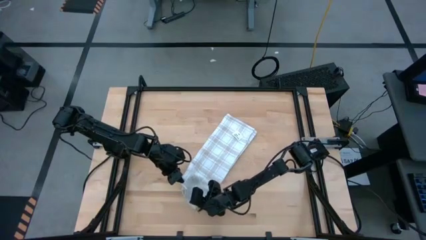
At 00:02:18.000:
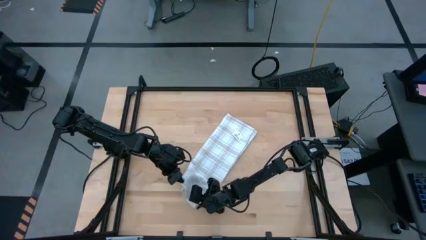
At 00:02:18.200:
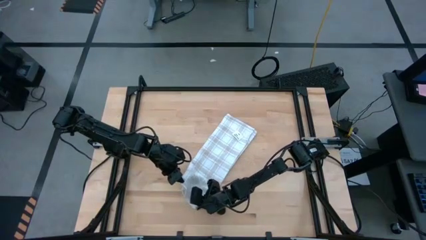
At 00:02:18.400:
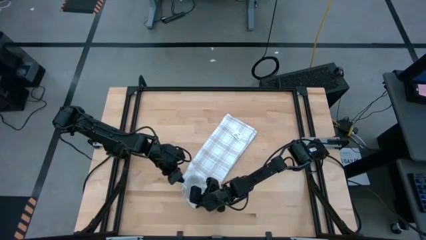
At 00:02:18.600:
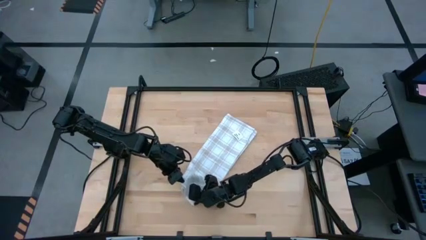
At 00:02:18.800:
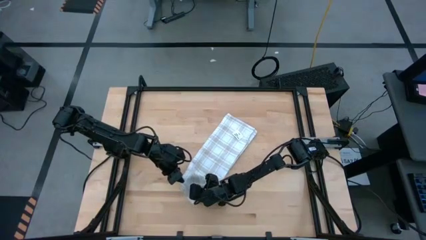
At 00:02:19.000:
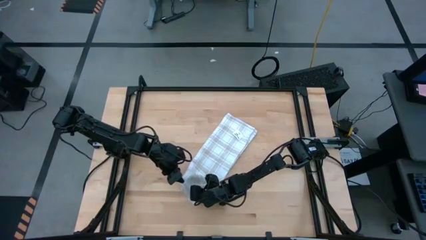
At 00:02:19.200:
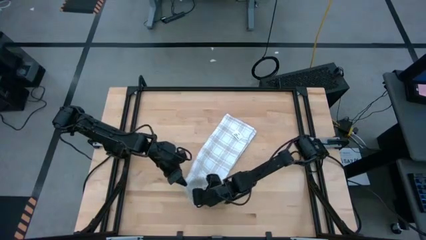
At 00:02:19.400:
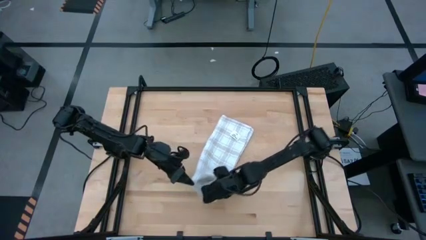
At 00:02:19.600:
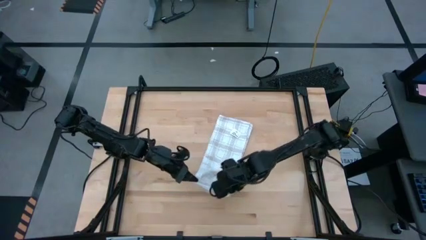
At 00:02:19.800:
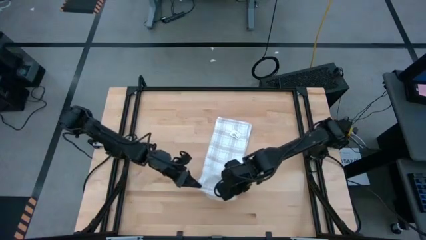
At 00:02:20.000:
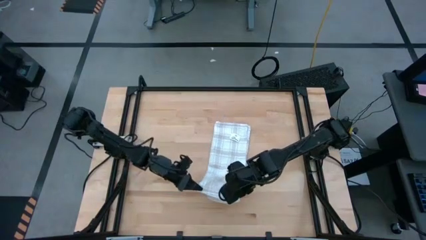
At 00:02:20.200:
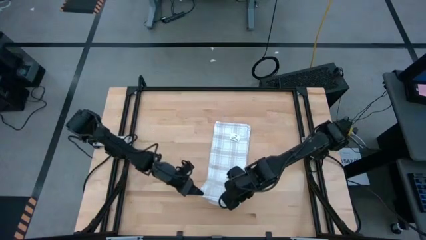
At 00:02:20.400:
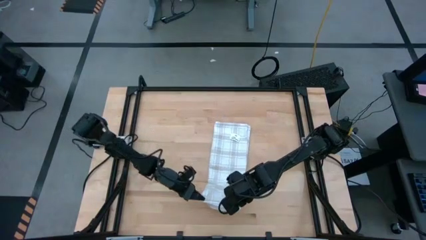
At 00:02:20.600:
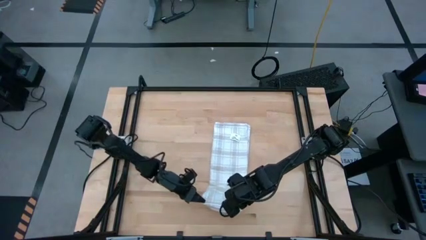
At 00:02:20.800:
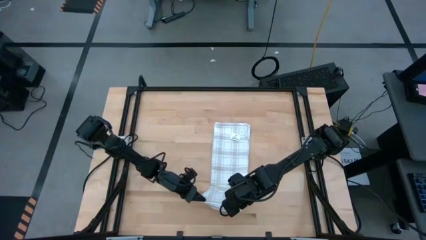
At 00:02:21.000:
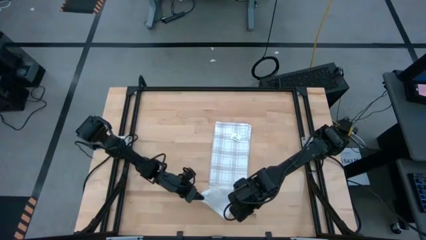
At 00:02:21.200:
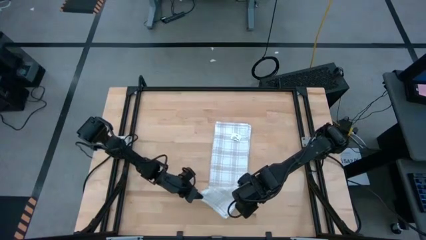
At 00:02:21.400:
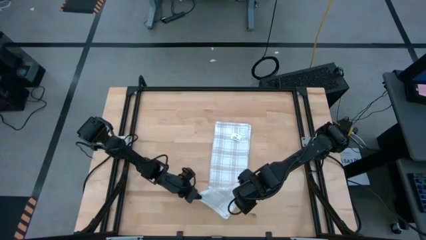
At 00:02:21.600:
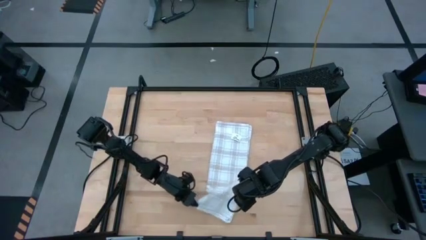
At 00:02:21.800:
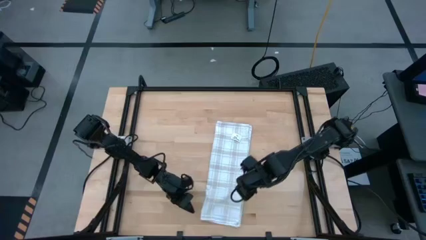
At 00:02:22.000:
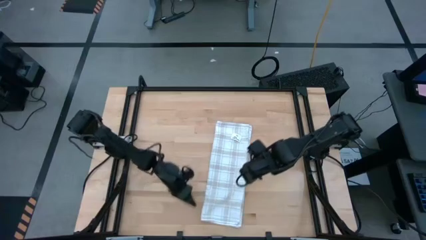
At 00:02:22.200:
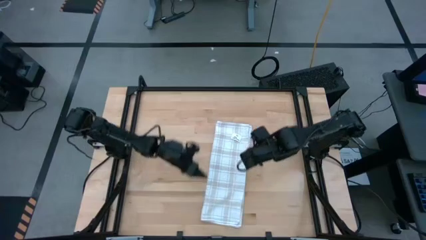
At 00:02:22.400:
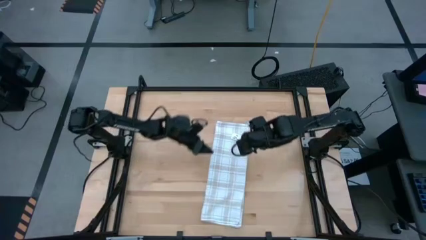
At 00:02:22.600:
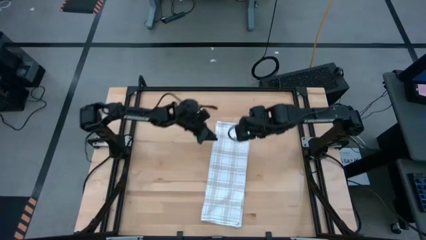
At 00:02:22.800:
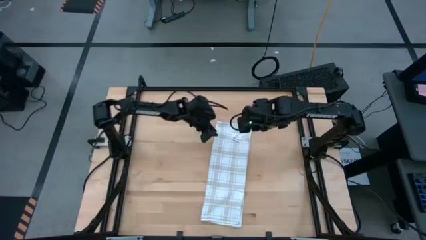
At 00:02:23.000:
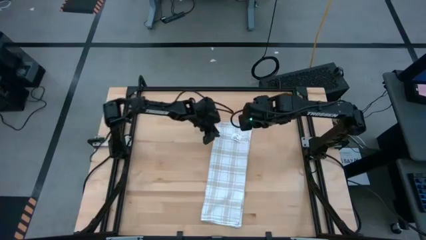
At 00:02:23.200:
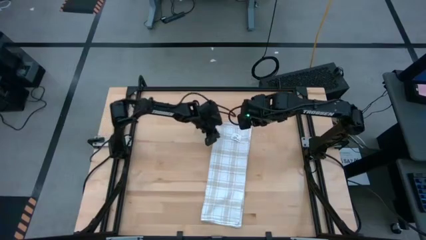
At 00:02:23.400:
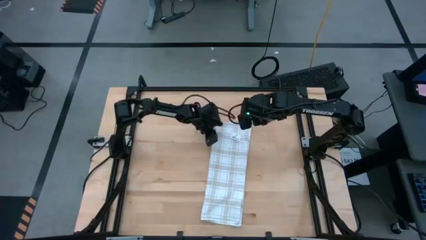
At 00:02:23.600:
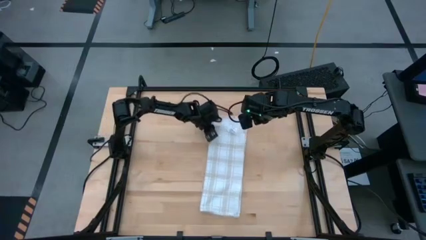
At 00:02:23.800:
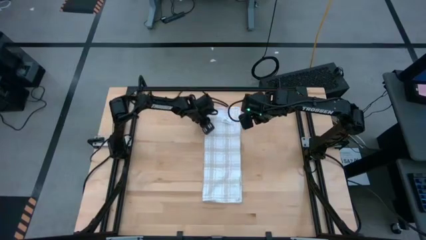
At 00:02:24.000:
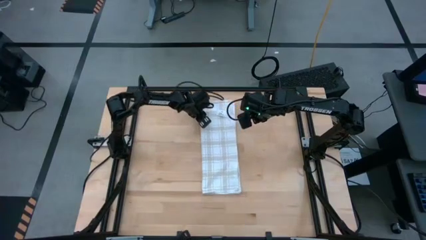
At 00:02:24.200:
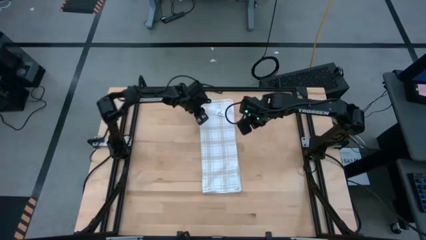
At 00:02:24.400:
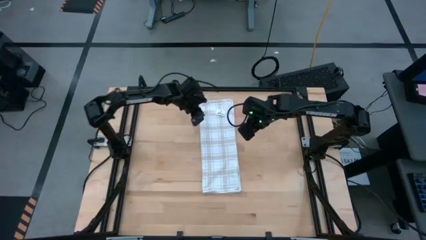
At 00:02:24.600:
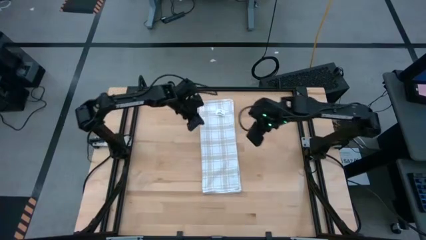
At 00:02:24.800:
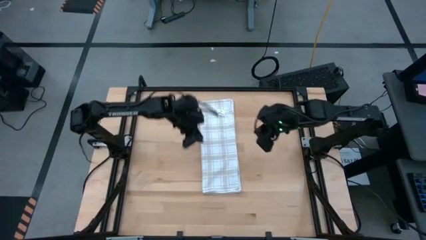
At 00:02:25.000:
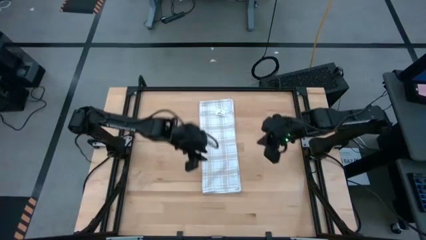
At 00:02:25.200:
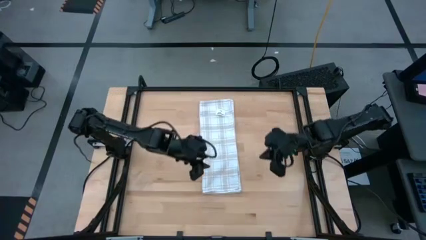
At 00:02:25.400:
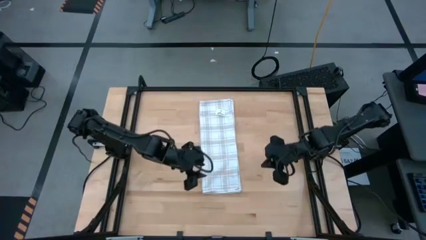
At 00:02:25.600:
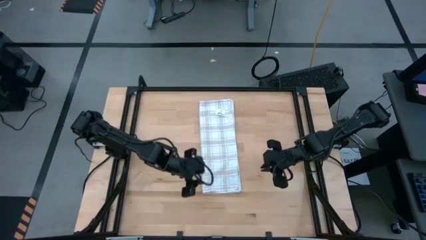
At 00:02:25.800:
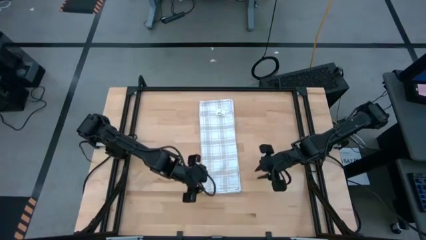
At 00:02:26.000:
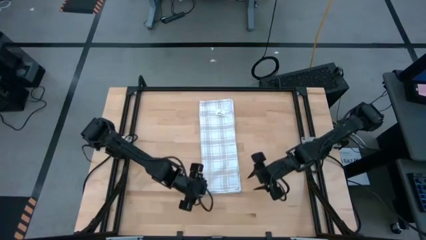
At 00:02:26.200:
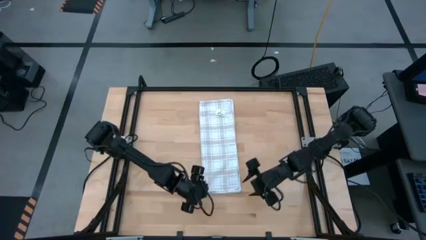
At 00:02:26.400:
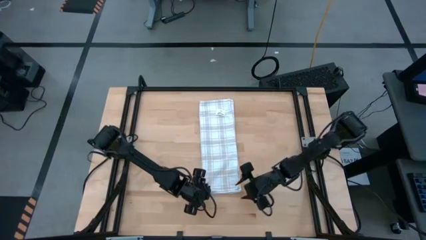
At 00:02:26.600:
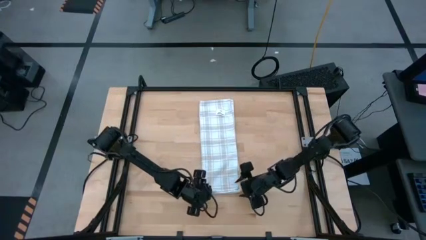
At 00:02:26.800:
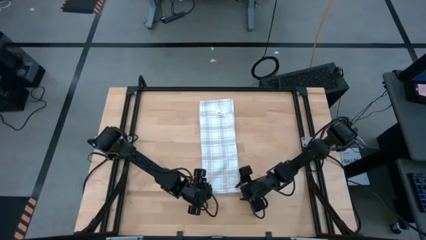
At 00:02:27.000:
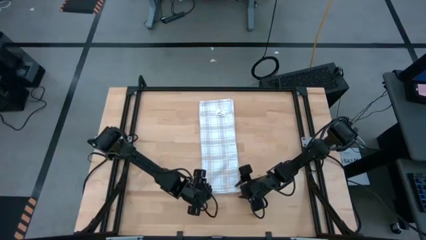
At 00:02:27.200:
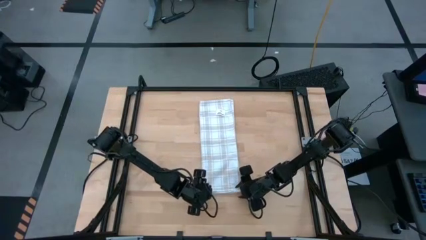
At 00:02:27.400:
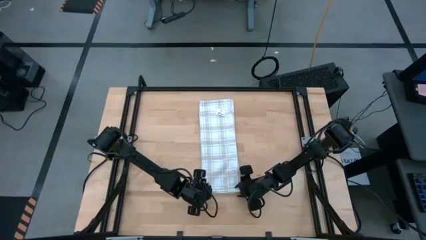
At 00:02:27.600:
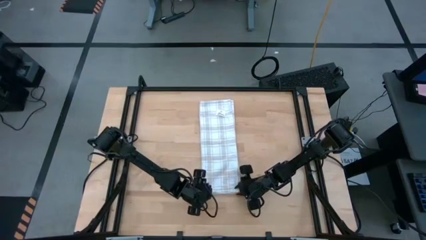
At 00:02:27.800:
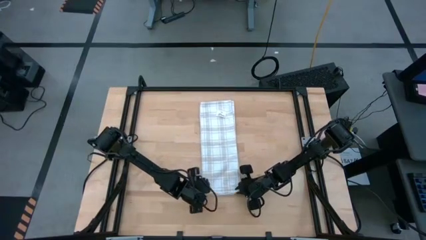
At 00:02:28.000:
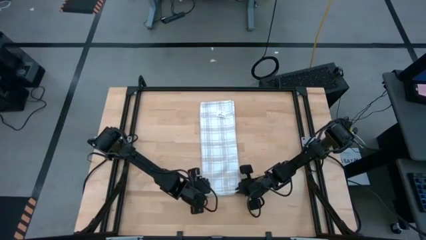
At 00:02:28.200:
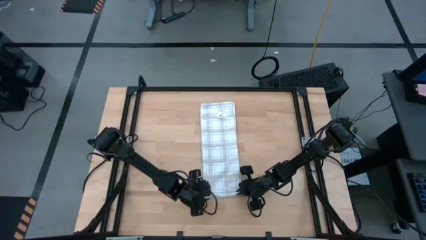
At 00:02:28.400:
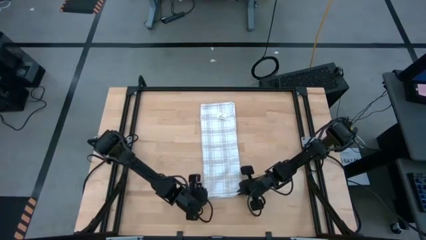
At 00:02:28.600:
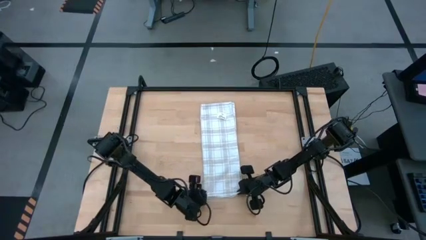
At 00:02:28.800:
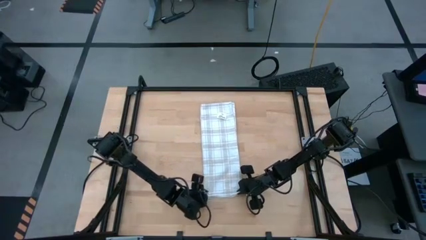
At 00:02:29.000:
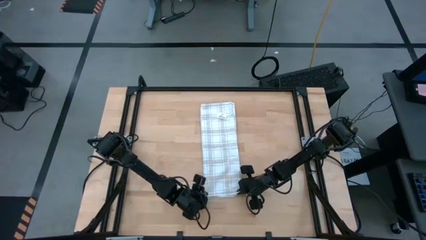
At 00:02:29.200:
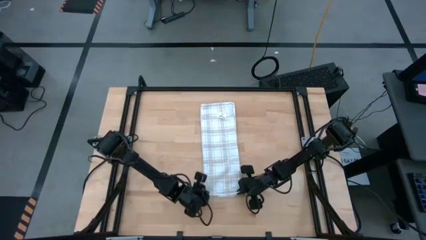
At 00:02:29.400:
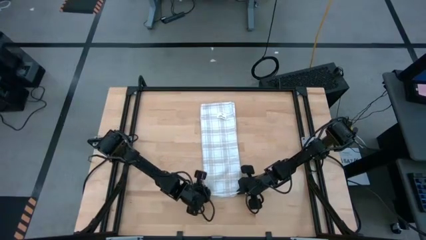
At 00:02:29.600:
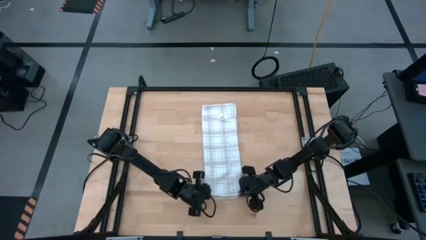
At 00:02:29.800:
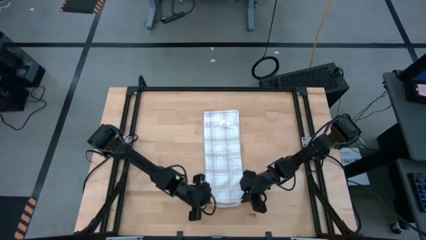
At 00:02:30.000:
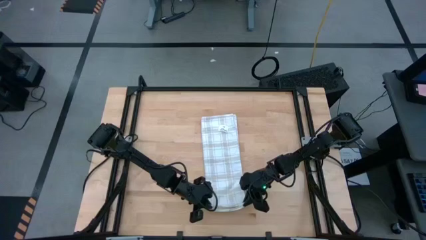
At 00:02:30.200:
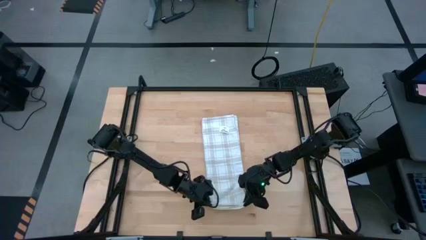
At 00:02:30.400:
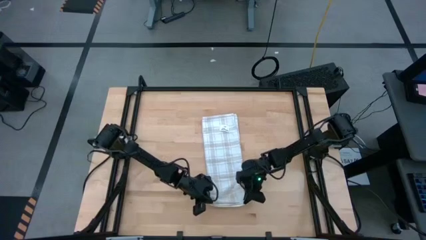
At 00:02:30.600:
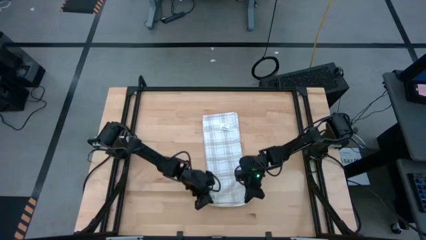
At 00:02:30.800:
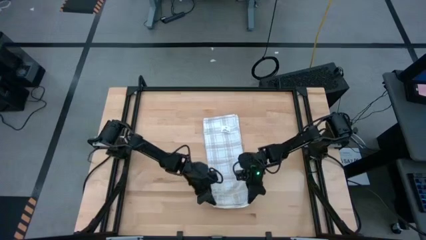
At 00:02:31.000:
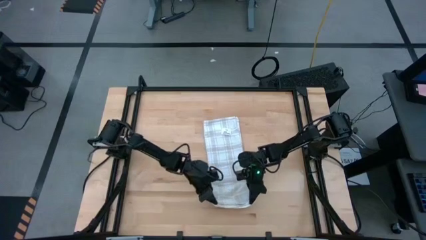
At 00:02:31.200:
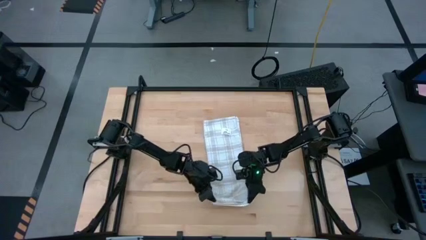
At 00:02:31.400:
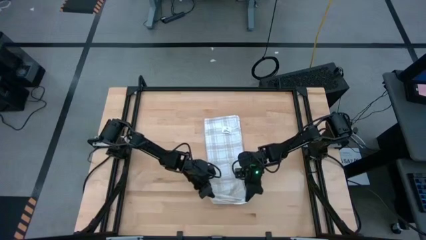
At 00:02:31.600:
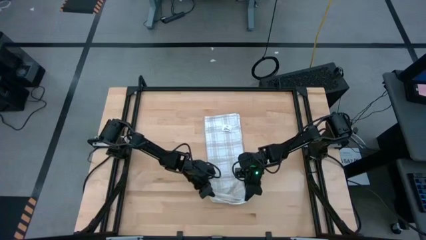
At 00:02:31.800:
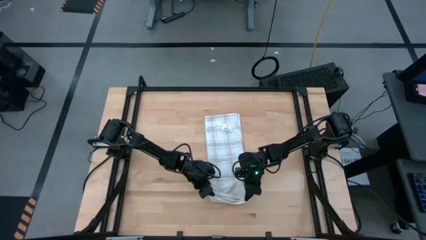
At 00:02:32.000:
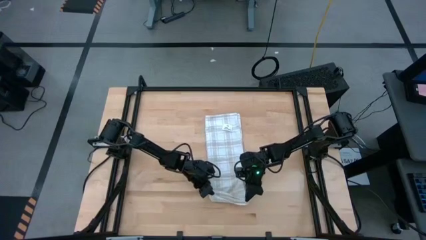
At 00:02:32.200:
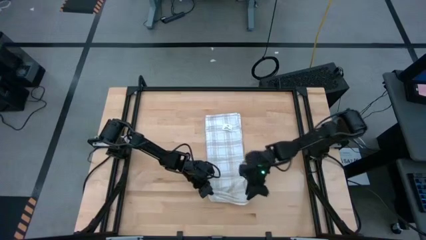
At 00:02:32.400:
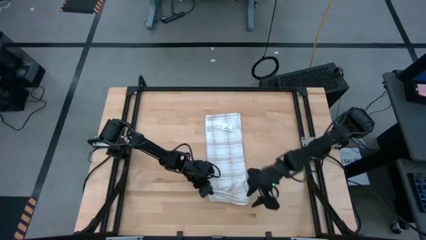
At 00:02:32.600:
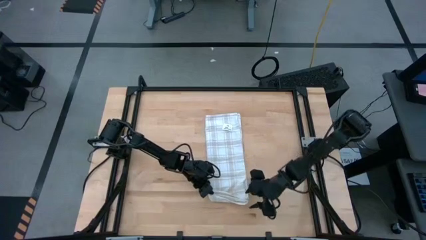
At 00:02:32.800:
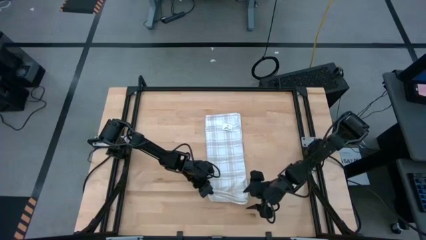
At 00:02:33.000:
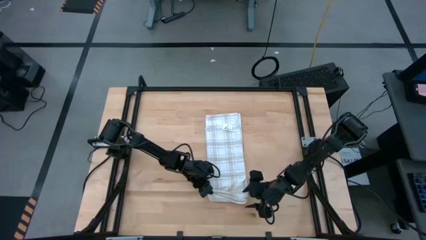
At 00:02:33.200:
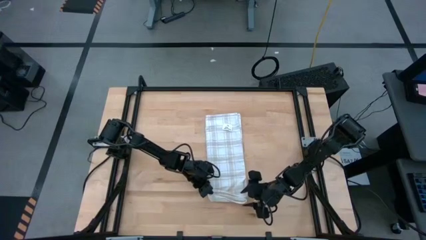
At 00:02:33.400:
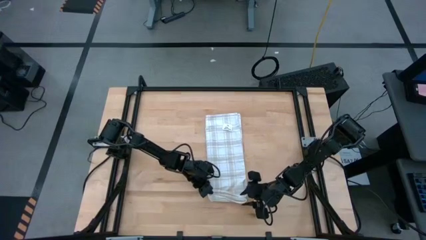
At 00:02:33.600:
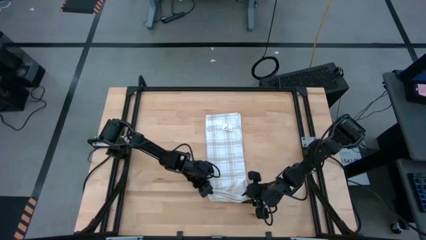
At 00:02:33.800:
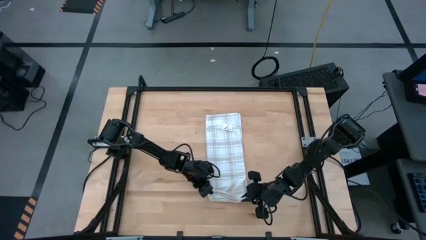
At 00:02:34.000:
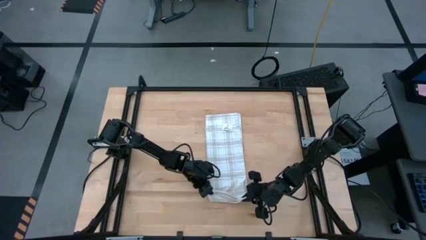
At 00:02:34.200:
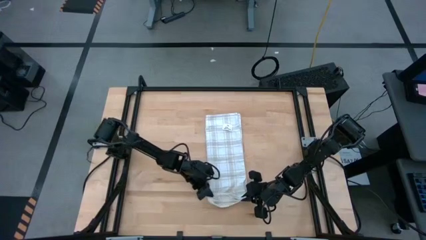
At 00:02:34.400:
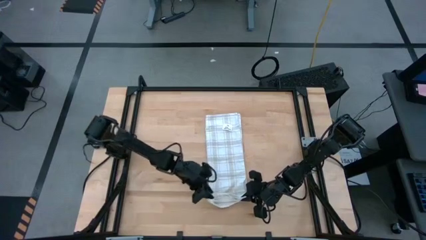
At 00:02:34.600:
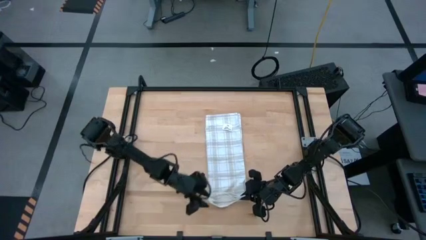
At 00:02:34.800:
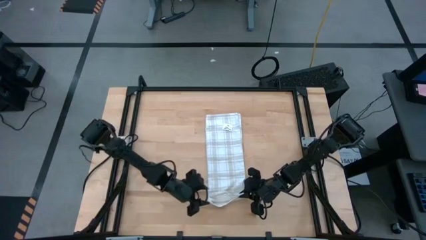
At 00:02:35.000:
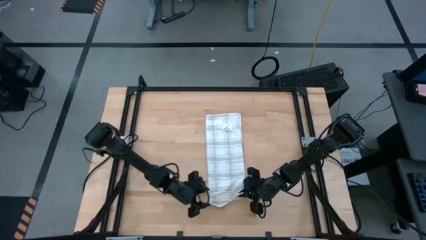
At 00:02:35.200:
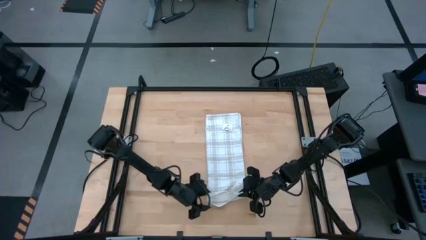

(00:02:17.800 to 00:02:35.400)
Task: Roll towel
Roll the towel
